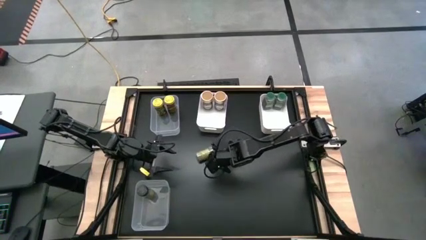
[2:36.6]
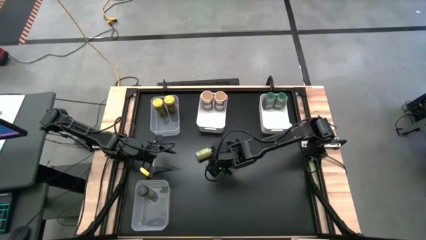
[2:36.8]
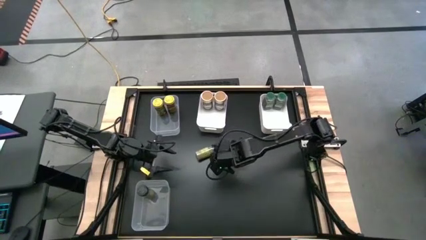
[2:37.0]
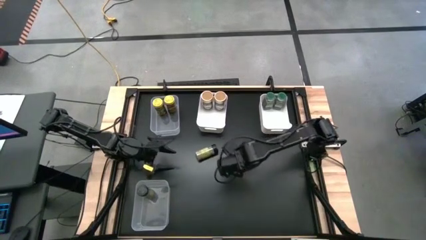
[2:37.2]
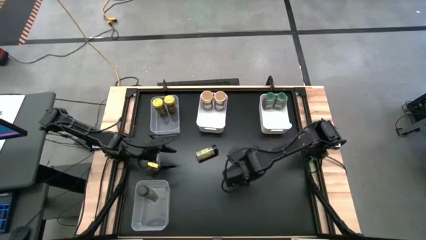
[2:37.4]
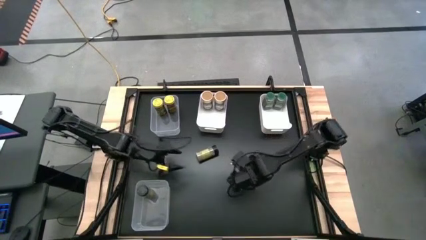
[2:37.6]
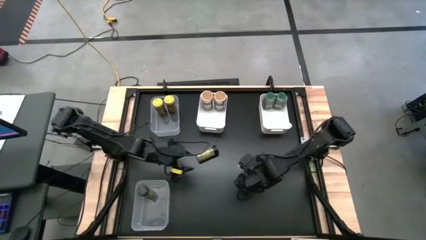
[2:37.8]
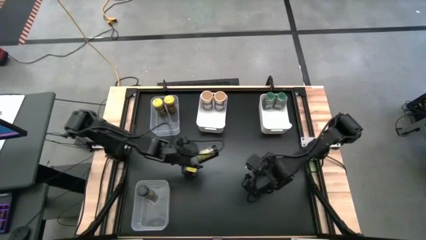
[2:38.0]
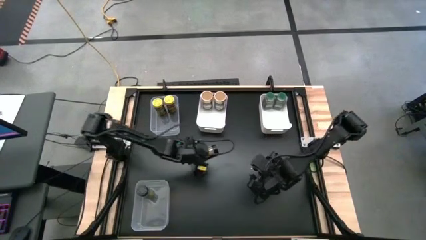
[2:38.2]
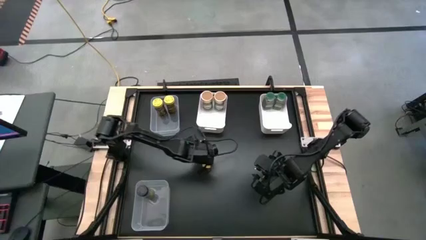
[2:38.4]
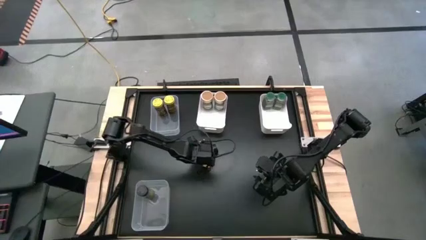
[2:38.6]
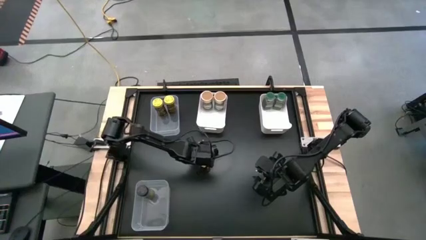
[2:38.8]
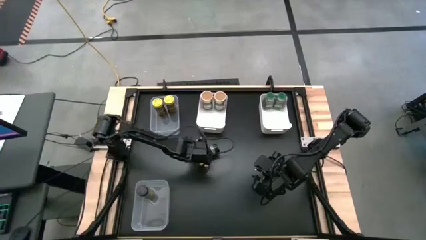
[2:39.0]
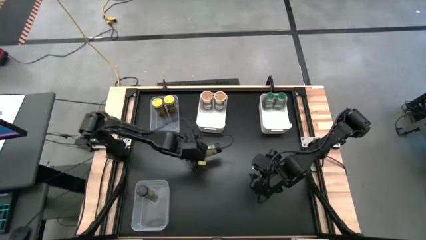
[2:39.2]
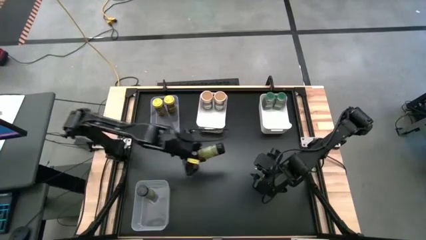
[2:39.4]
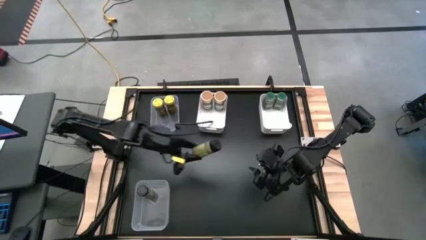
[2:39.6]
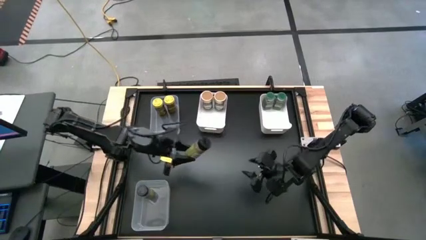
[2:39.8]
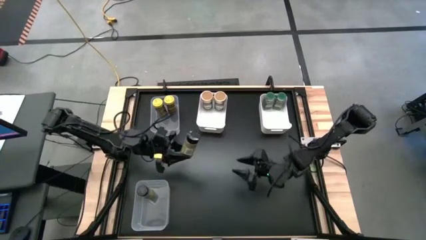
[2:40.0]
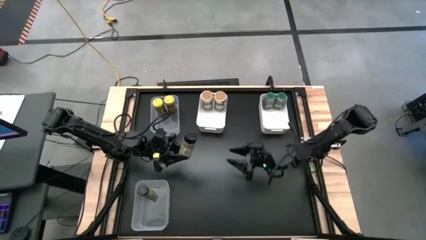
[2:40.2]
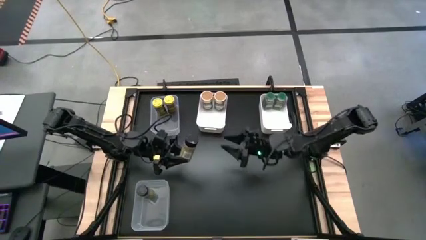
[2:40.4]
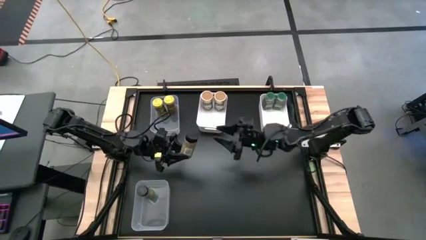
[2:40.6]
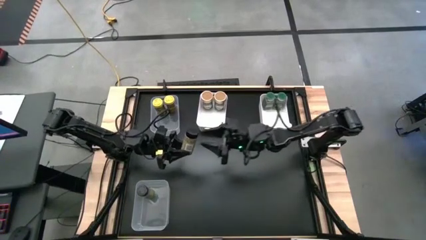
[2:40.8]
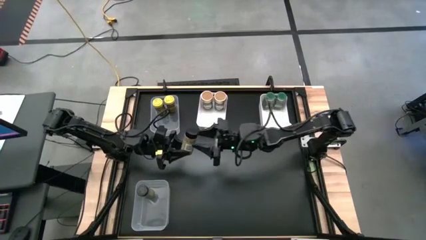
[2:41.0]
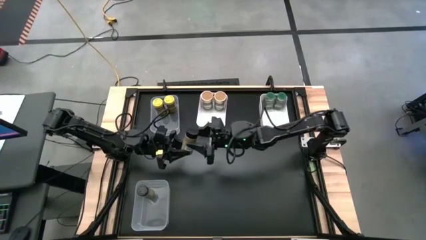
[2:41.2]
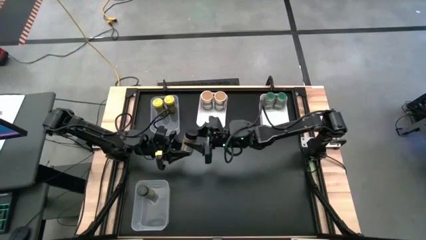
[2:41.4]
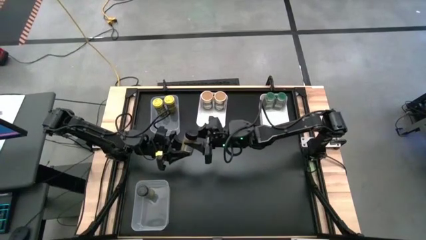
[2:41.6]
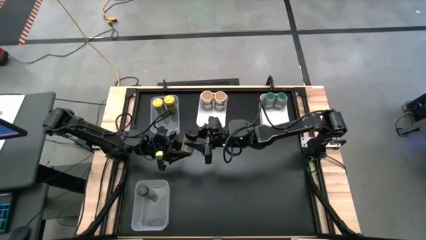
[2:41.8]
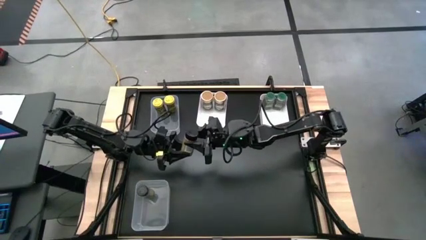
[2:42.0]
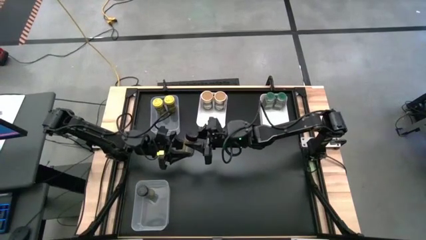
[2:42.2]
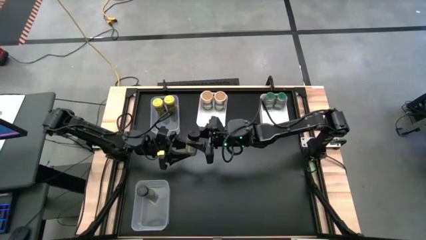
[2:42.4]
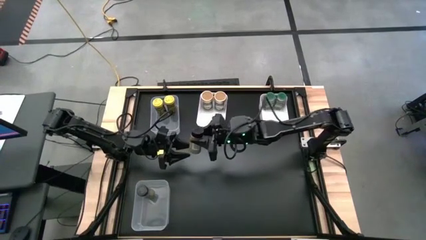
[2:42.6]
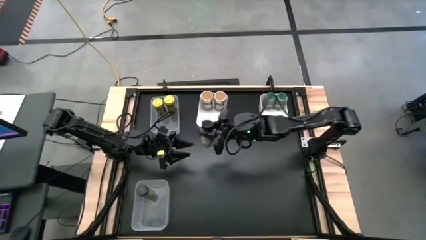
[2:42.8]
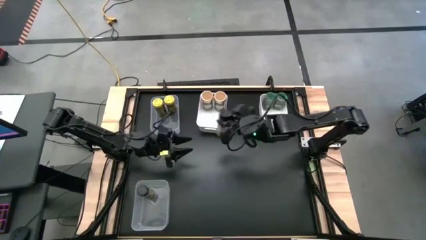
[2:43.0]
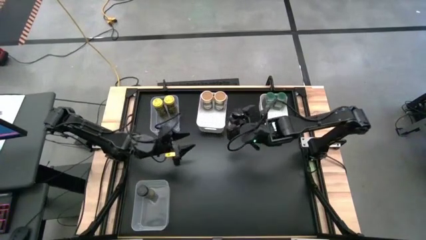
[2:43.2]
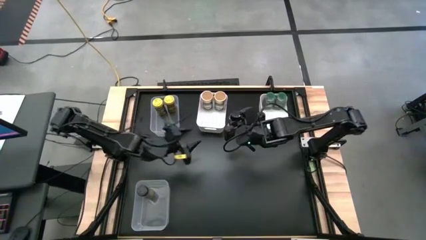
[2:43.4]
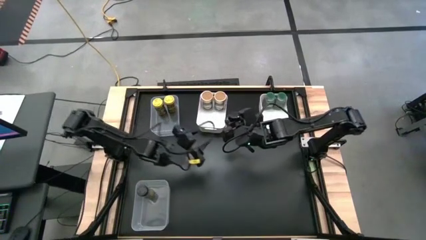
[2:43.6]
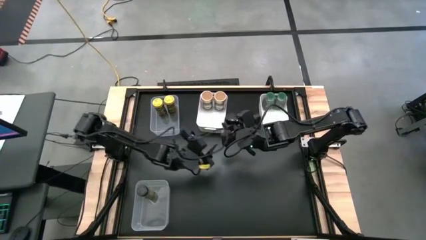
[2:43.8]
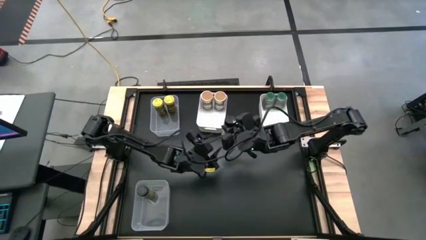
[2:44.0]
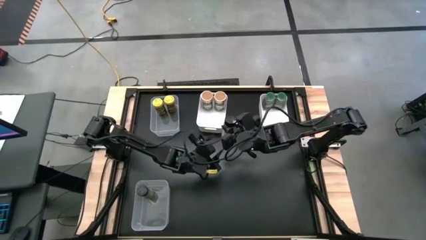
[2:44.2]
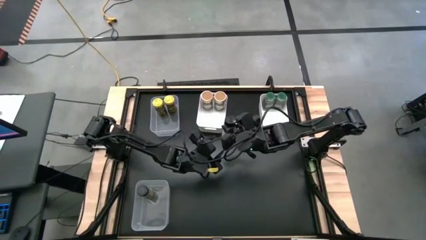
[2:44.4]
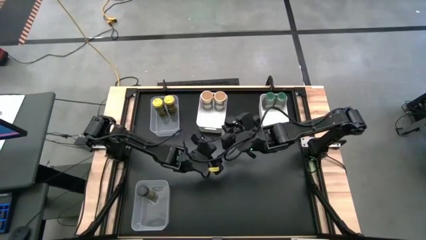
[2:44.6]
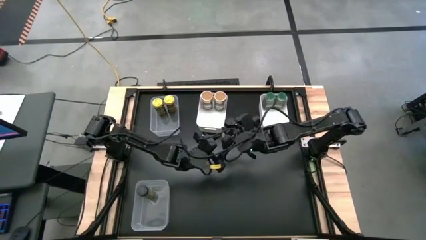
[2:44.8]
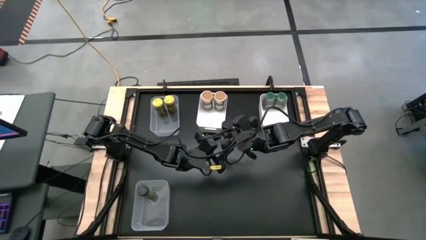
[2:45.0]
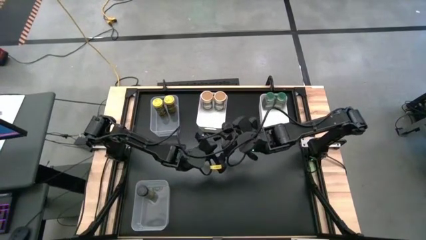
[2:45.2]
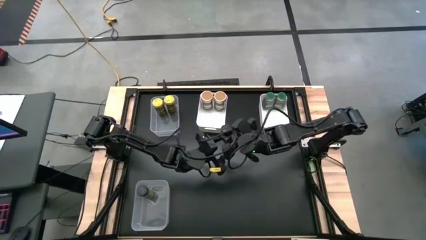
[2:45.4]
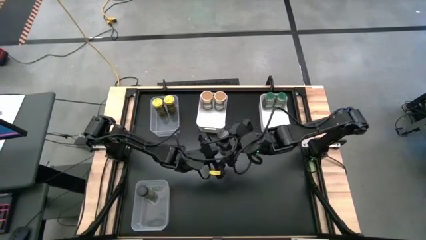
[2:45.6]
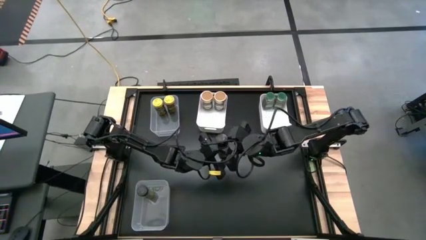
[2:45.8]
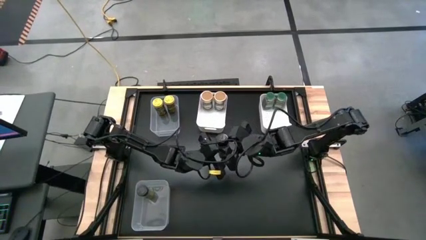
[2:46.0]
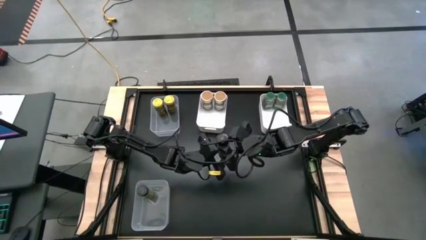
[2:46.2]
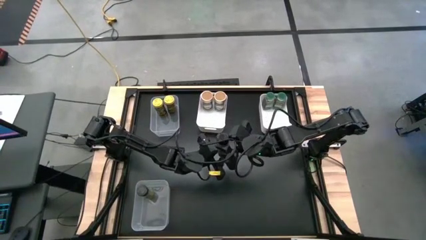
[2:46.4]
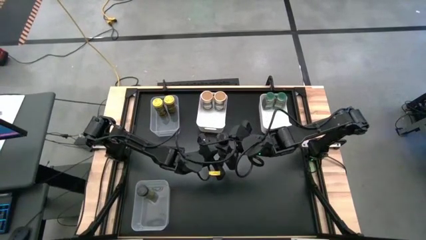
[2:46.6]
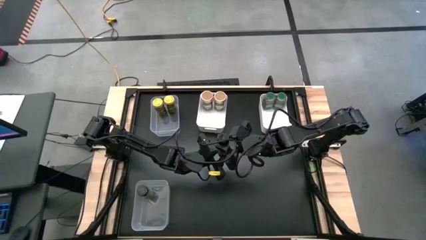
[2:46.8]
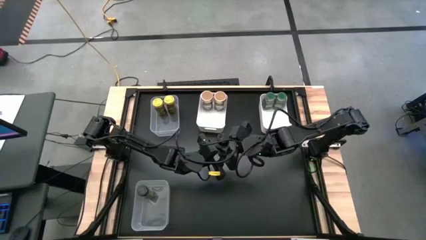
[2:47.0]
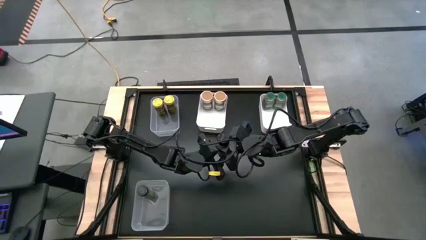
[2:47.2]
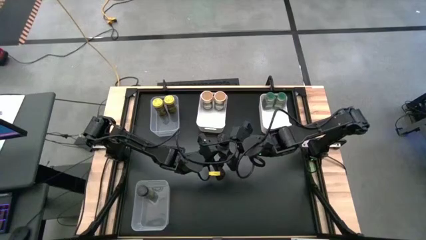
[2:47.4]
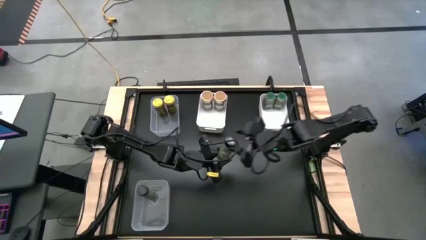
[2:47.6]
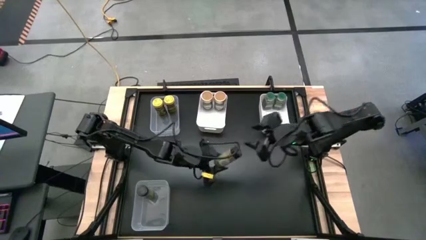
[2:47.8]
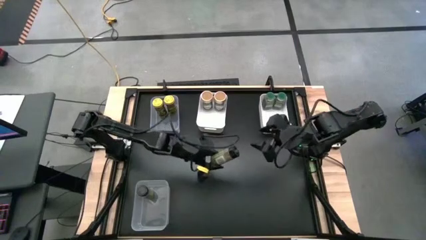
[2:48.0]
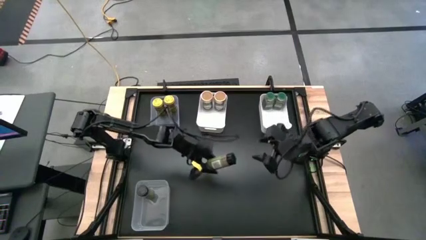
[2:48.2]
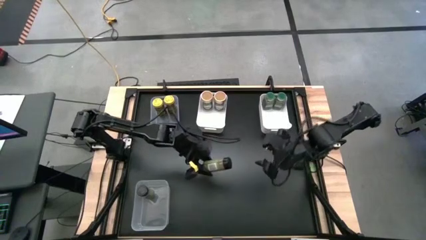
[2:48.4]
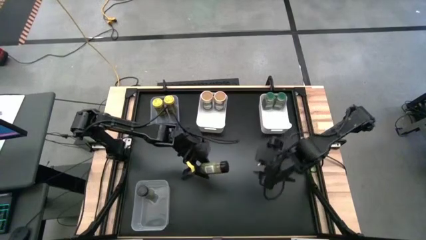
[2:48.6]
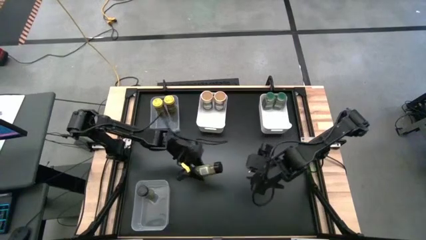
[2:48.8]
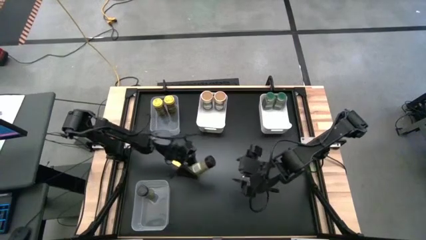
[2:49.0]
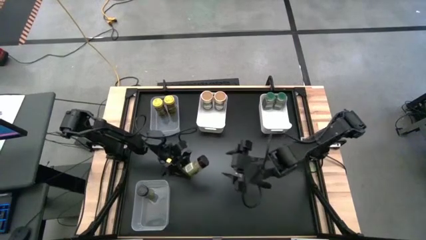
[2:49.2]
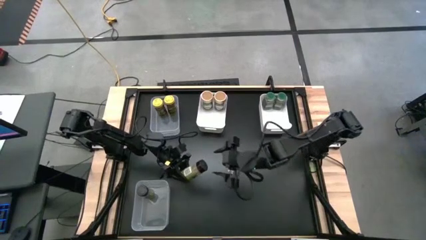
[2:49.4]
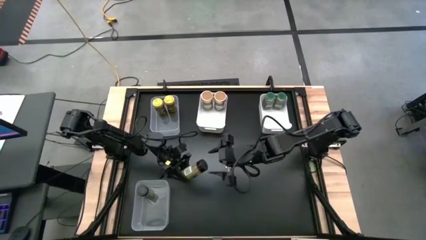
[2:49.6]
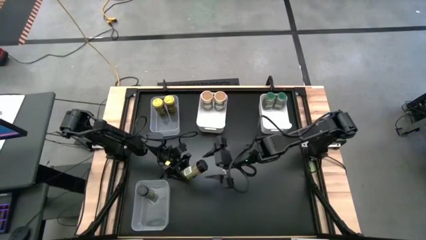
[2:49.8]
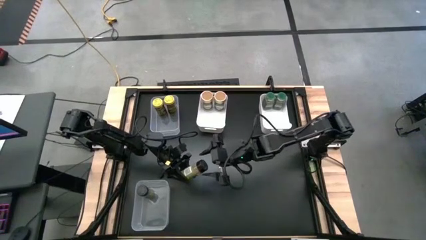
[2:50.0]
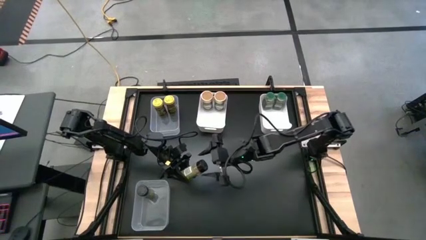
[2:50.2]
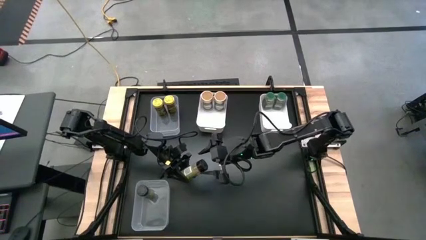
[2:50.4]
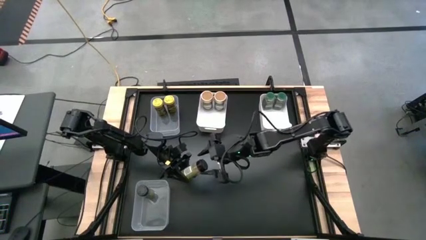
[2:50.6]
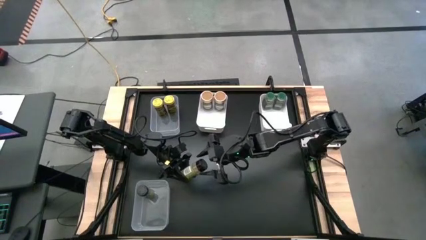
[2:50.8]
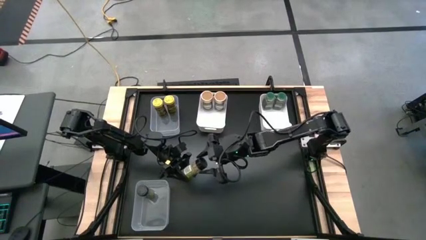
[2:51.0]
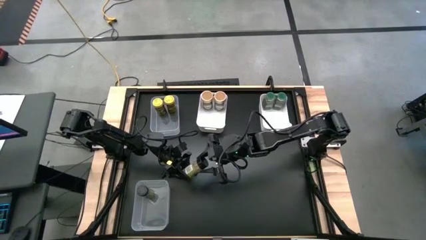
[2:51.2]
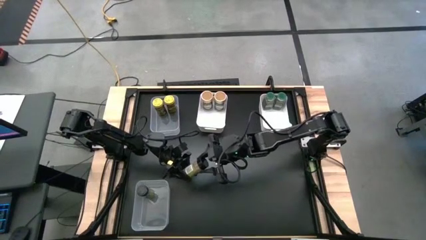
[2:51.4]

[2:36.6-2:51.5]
Task: Sort spices by type
Put the black spice bottle into the bottom transparent bin

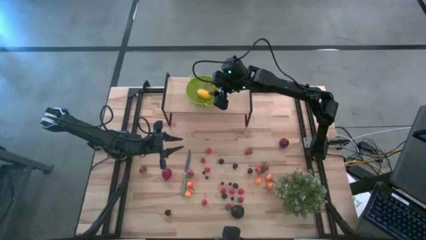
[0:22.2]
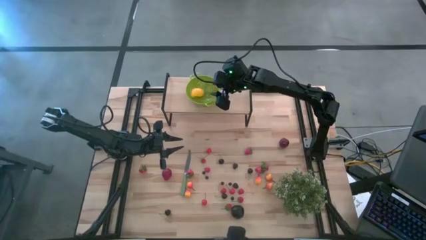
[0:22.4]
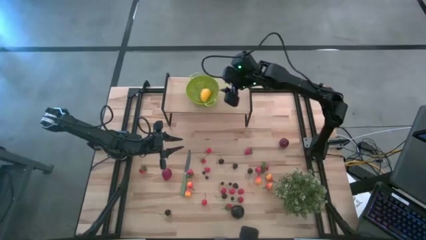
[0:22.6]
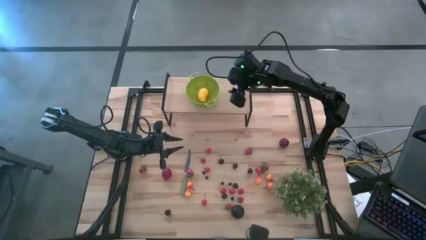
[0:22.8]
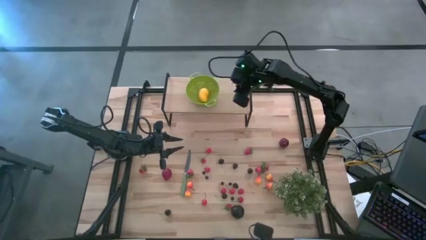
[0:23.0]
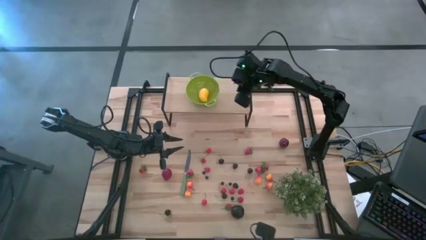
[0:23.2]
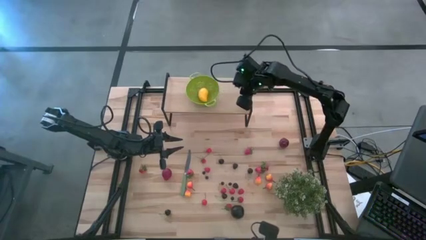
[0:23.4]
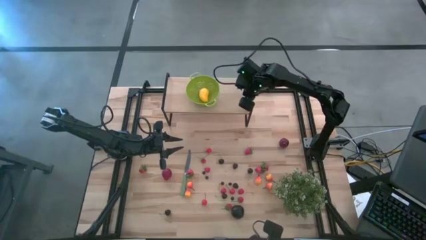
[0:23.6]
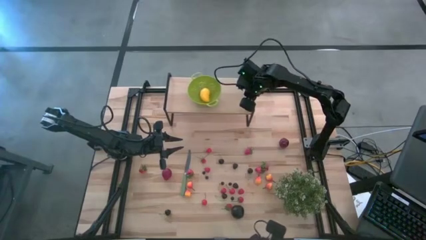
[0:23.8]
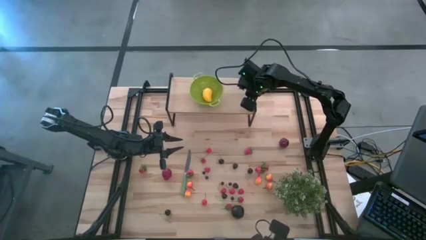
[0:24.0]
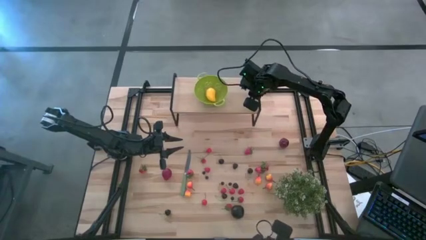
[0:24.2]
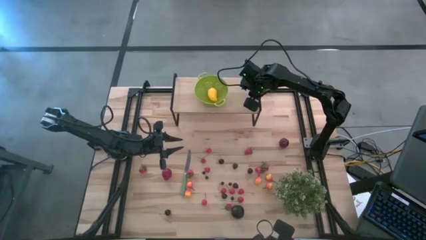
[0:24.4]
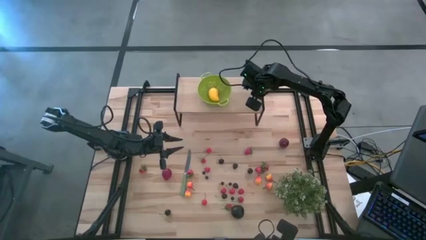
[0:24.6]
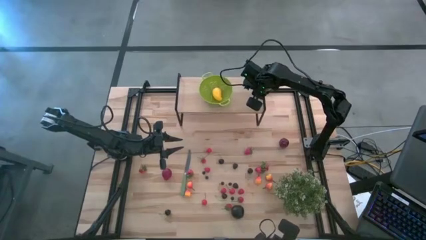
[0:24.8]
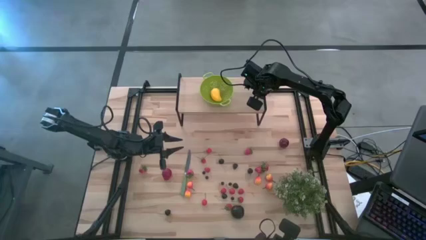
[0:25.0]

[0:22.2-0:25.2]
Task: Pick & Place Fruit
Adjust the shelf on the table
